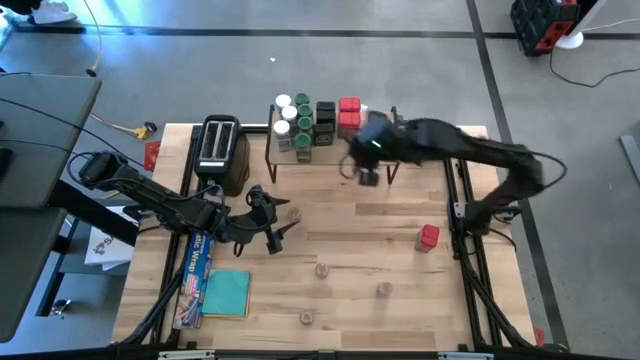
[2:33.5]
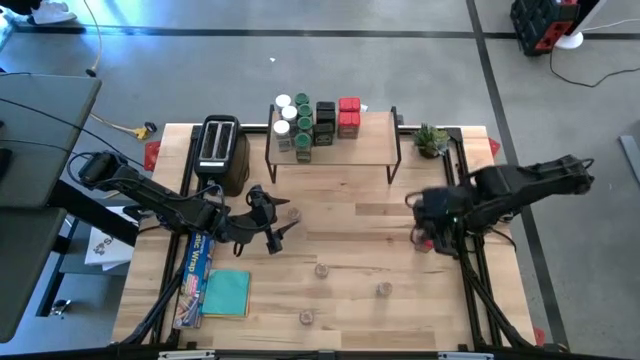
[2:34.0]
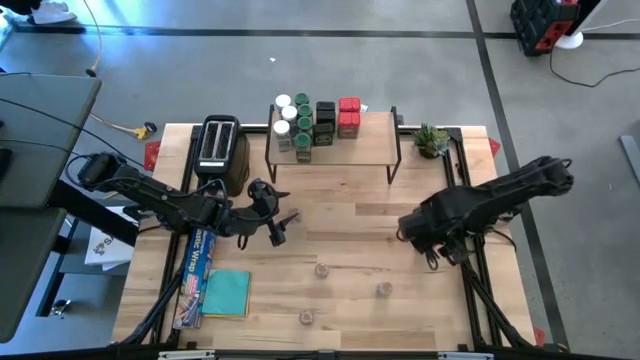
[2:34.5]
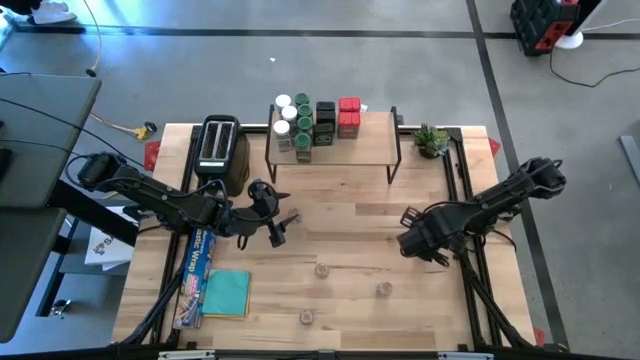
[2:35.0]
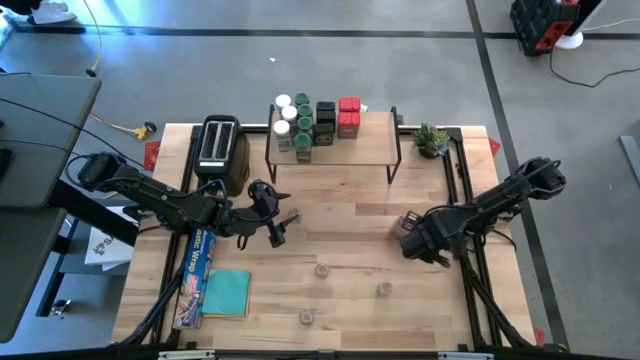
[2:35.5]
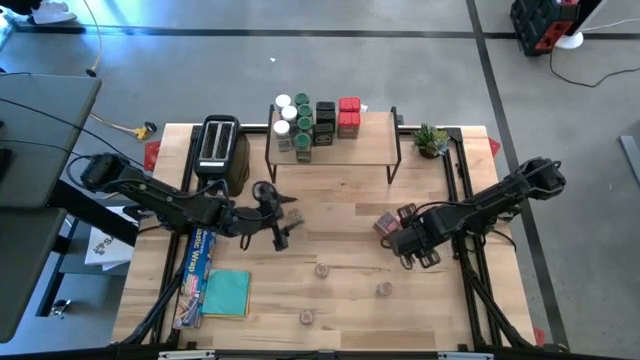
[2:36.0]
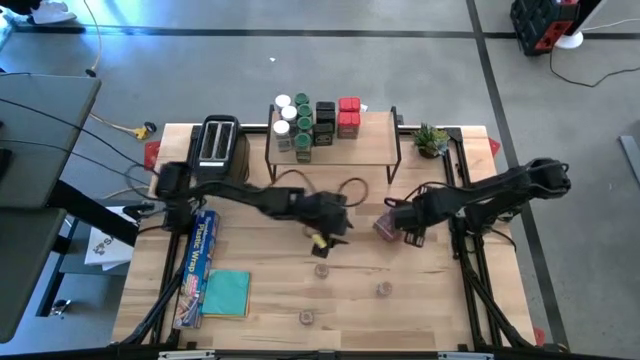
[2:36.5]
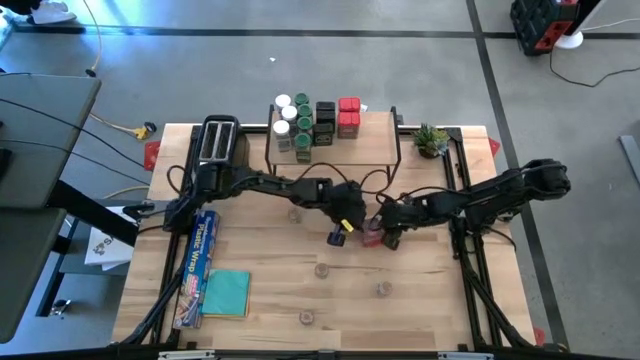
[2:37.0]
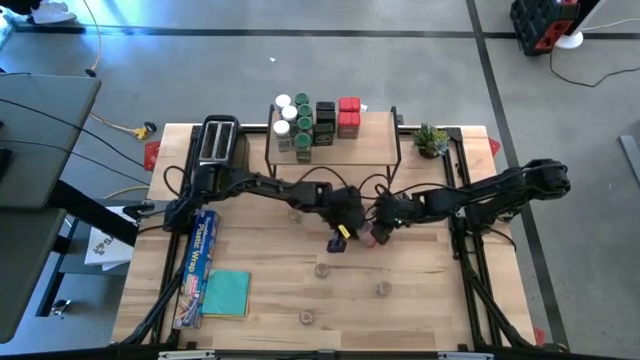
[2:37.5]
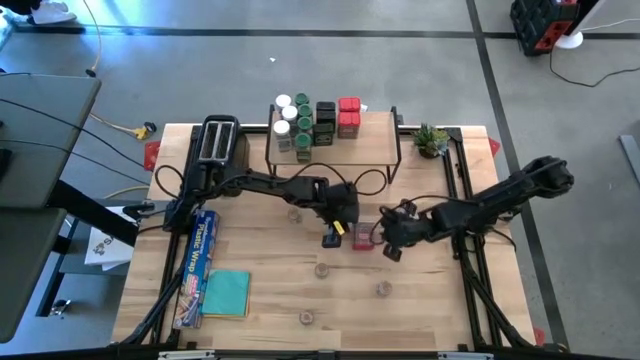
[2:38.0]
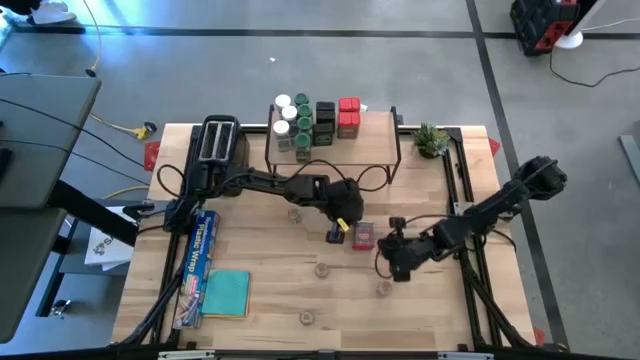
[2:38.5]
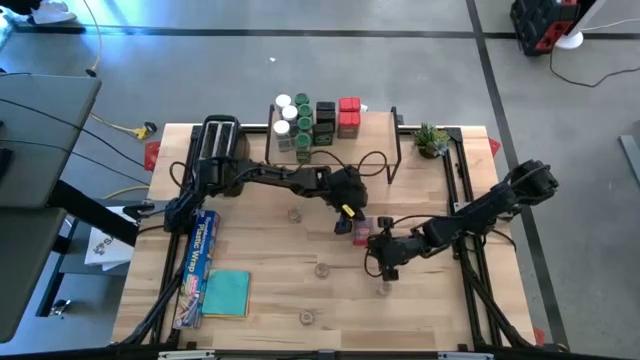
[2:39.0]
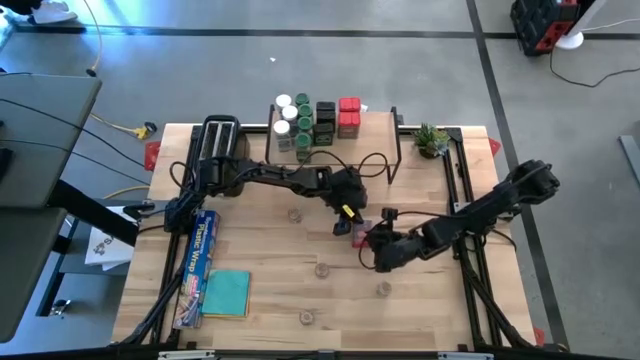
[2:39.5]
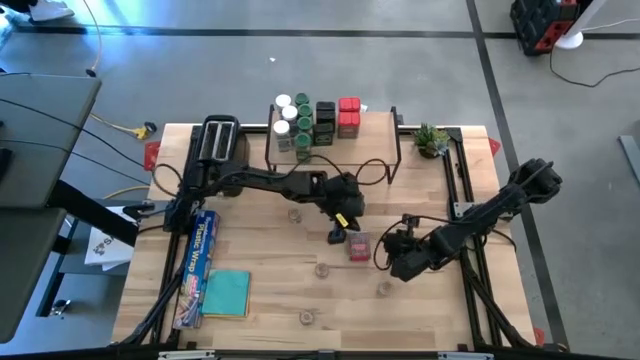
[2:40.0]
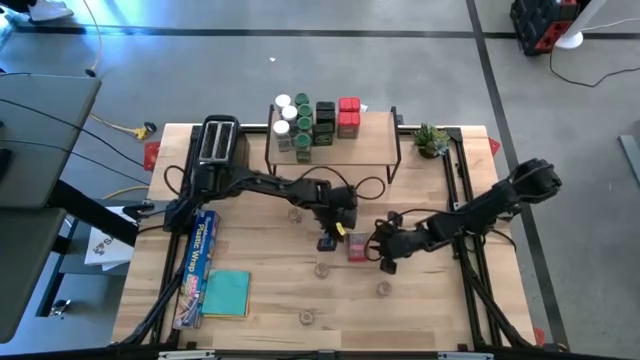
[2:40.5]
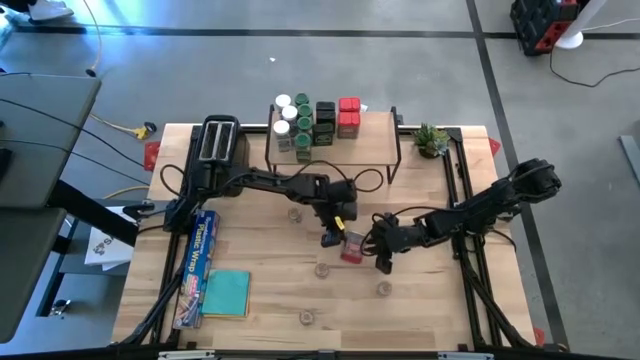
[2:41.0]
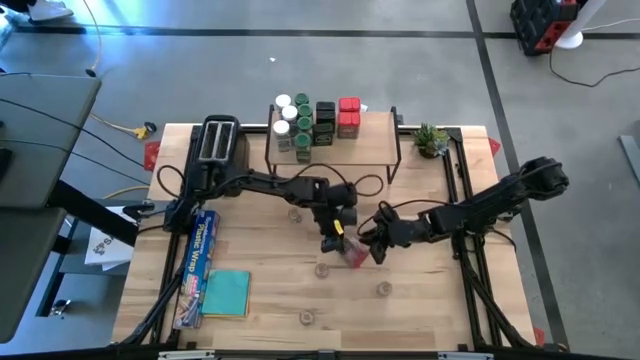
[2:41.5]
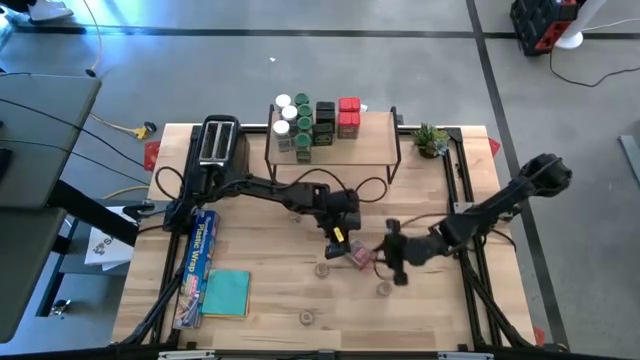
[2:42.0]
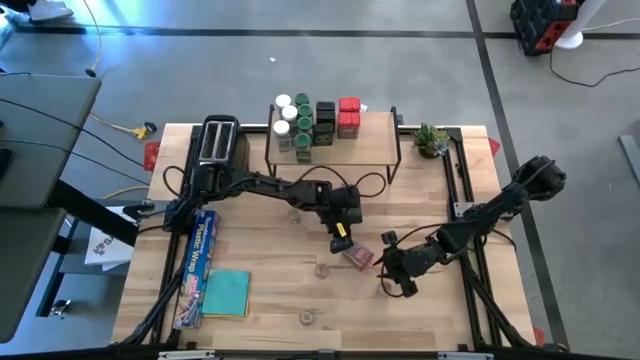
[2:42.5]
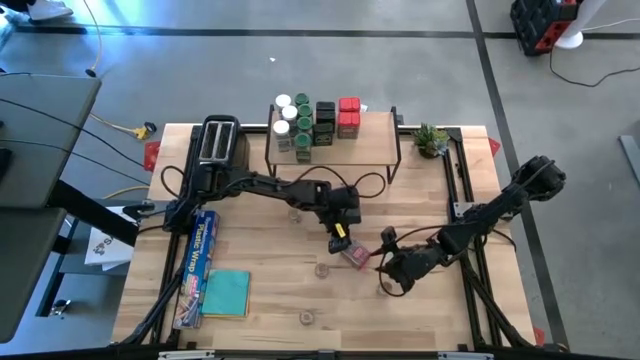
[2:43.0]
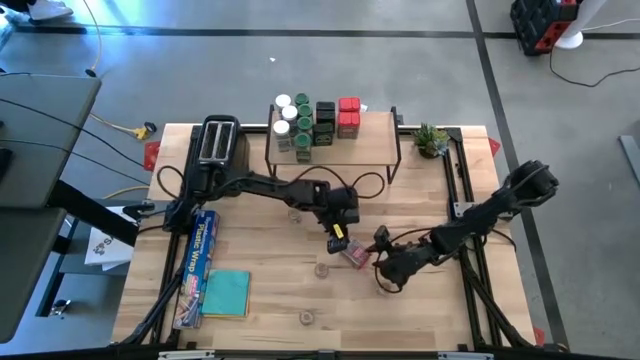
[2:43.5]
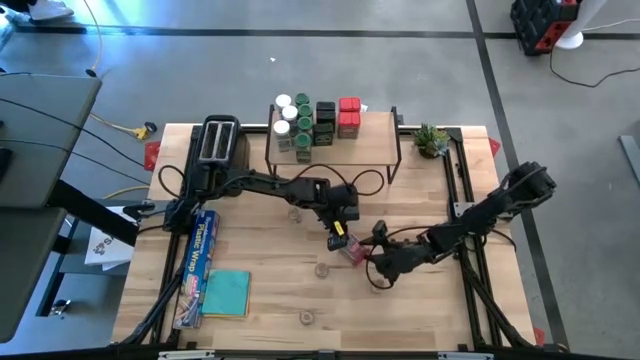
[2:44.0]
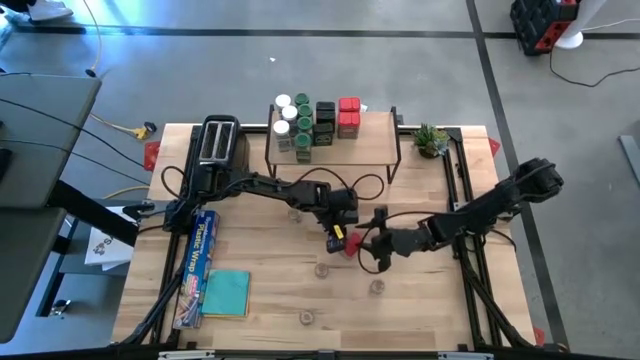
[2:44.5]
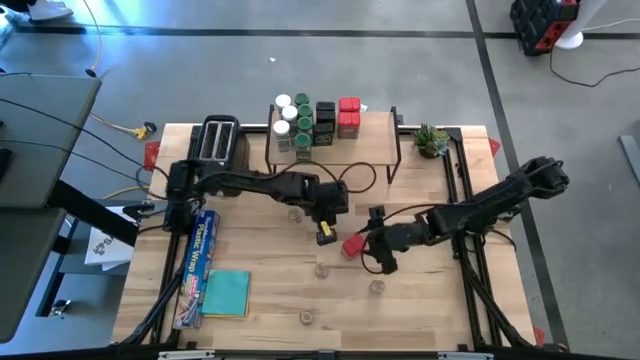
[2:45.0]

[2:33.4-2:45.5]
Task: Shelf spices
Put the red seasoning can on the shelf aligned with the other red seasoning can

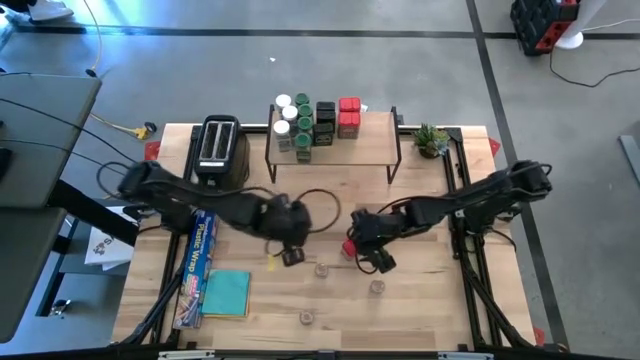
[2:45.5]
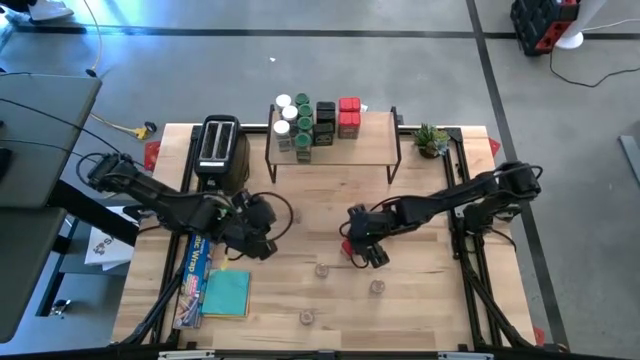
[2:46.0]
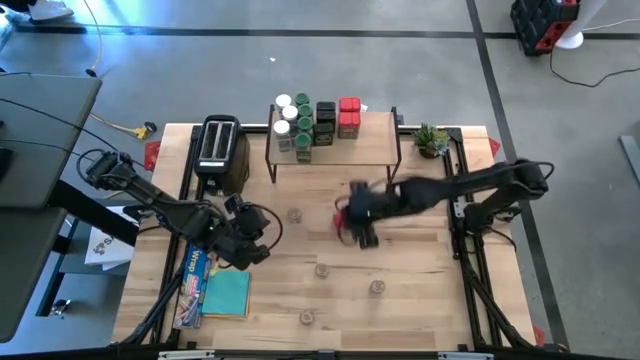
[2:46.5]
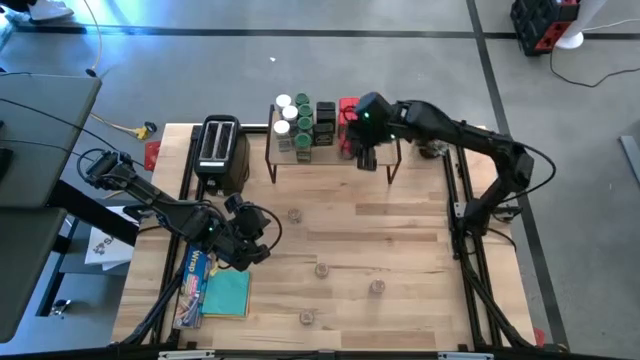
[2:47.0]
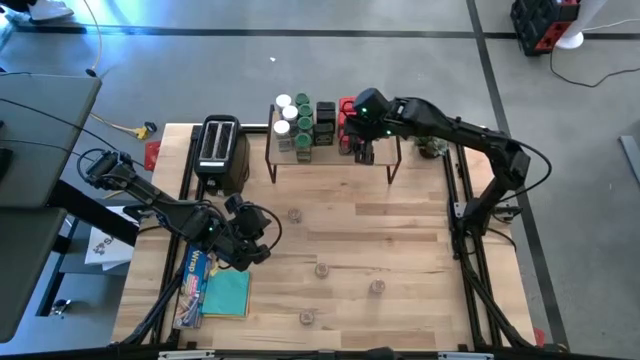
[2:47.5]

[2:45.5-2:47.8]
Put the red seasoning can on the shelf aligned with the other red seasoning can

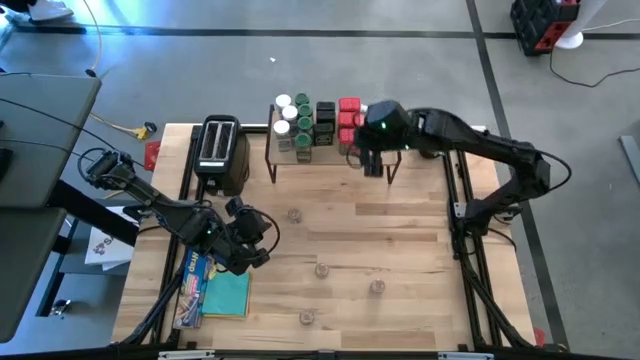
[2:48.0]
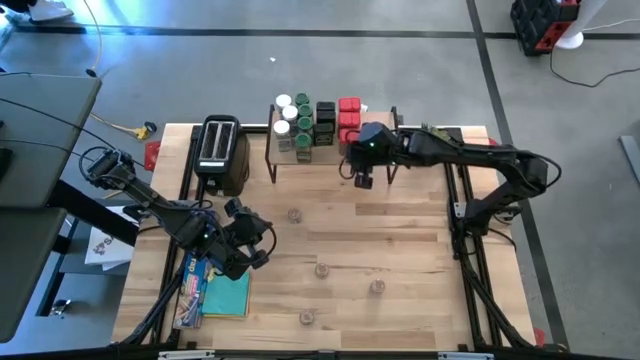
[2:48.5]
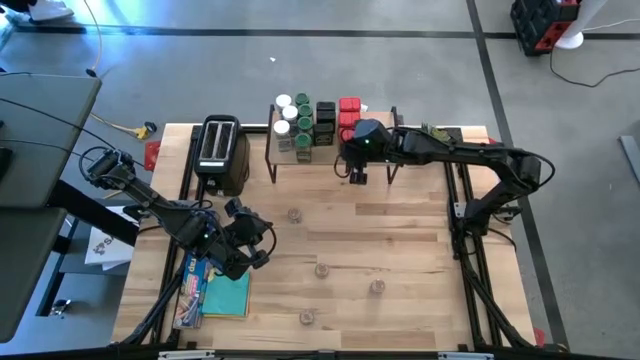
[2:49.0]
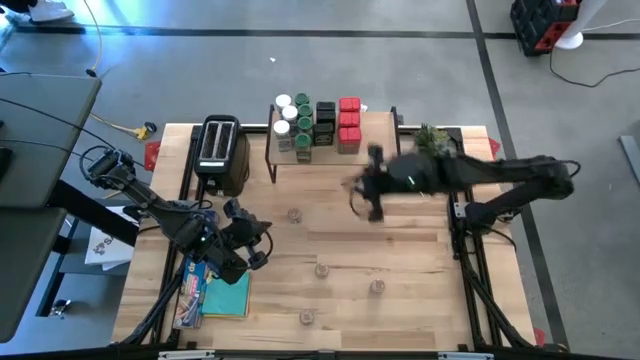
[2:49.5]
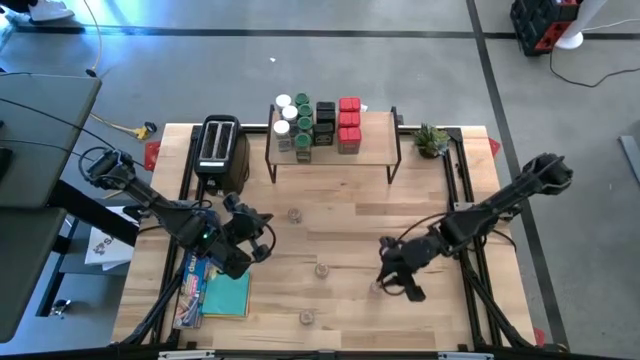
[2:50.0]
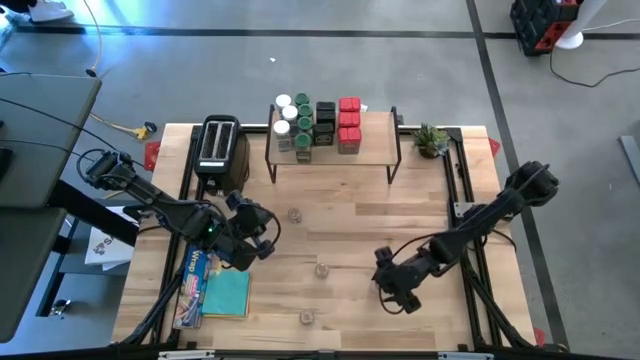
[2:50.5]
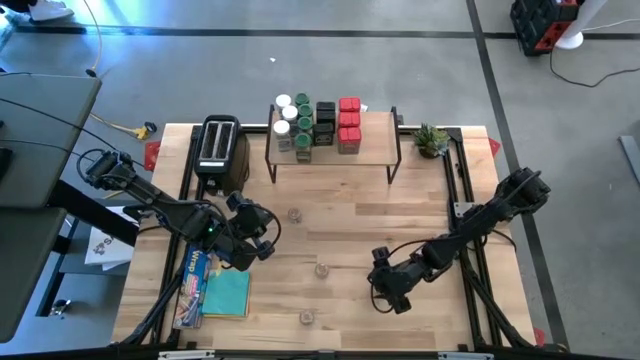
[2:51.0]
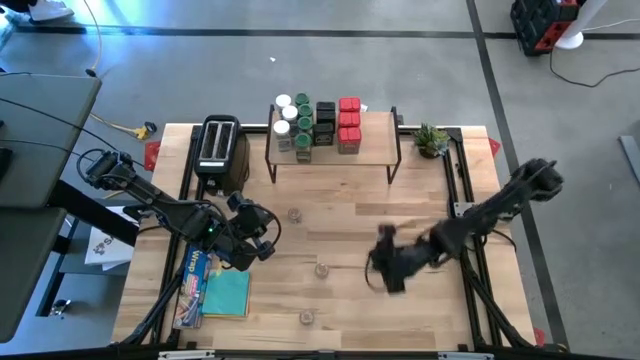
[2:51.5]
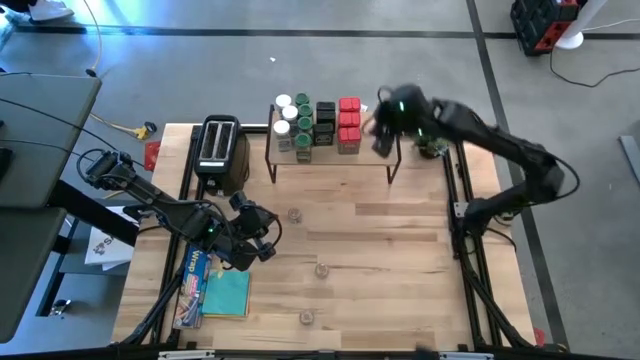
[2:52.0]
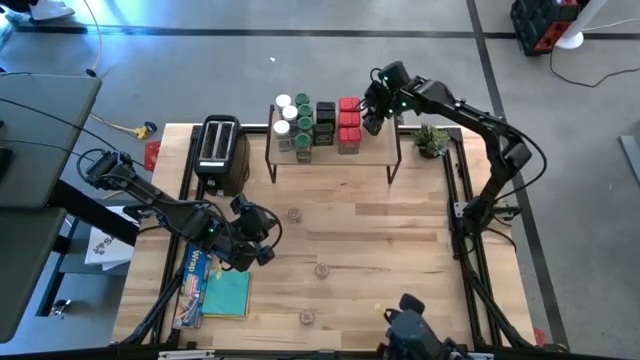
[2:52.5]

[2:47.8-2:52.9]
Put the right transparent seasoning bottle on the shelf

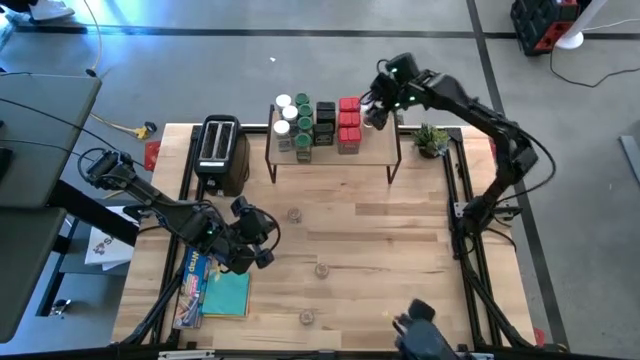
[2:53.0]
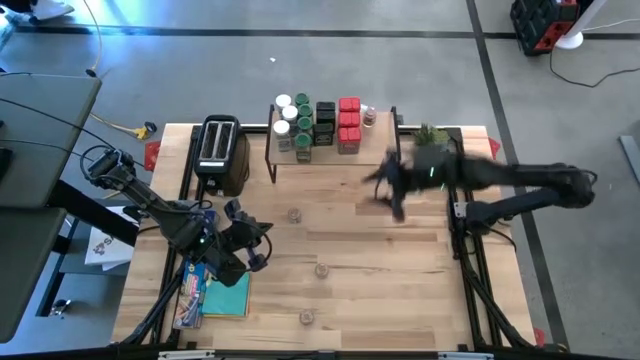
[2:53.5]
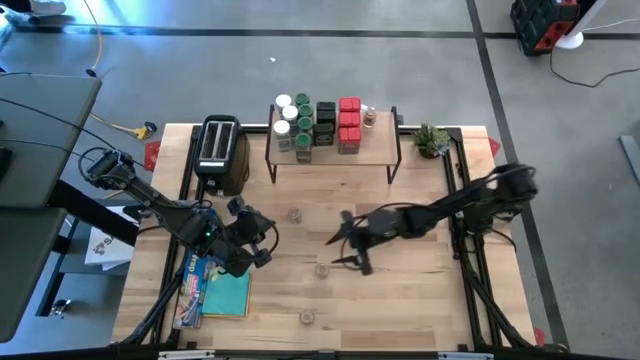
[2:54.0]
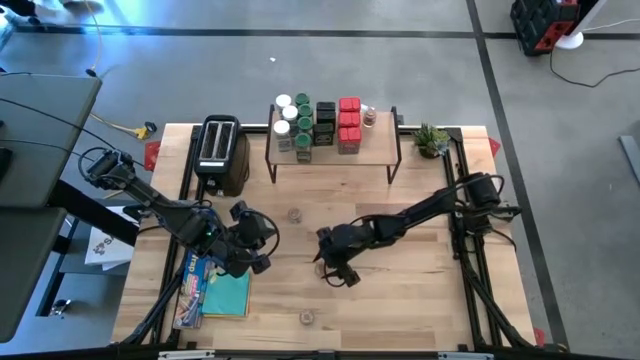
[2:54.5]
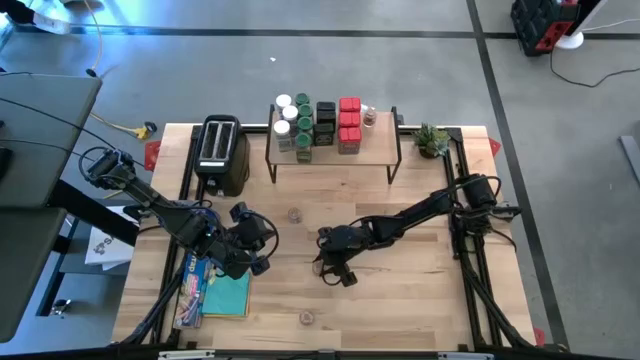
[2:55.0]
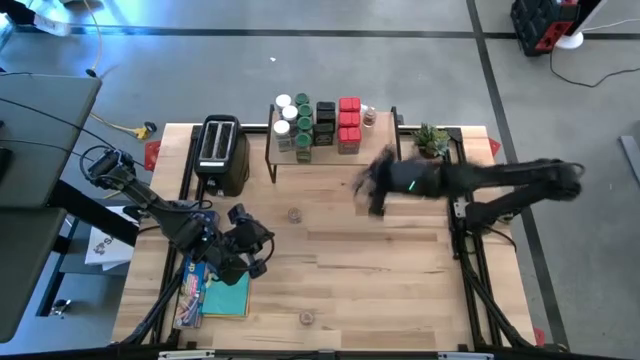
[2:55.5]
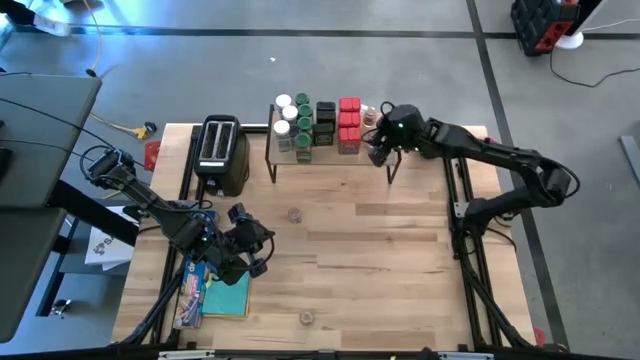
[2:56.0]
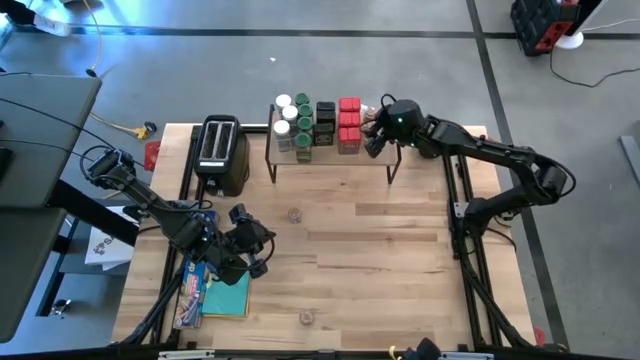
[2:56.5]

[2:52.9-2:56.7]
Put the center transparent seasoning bottle on the shelf aligned with the other transparent seasoning bottle
